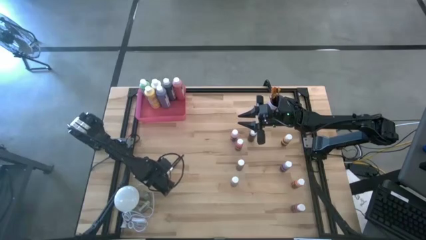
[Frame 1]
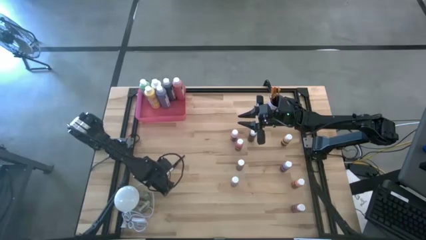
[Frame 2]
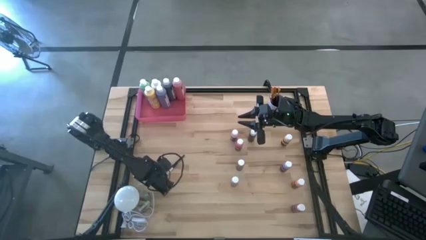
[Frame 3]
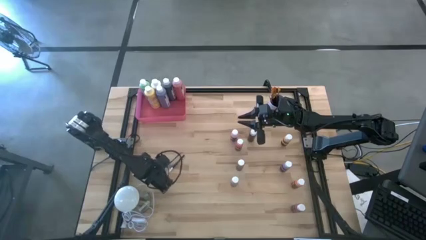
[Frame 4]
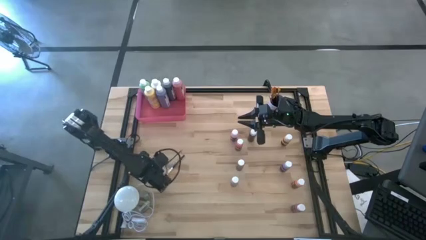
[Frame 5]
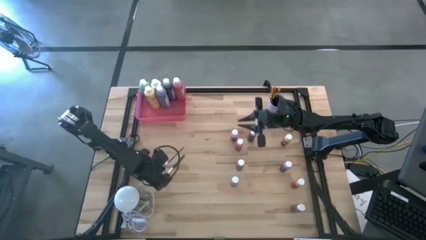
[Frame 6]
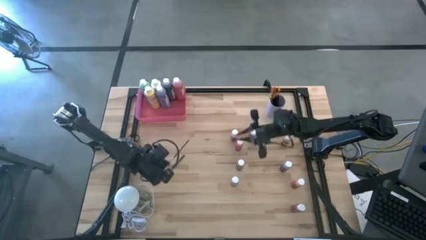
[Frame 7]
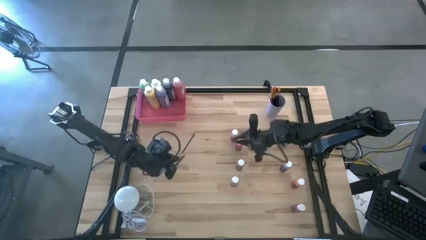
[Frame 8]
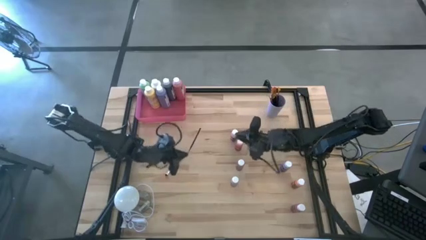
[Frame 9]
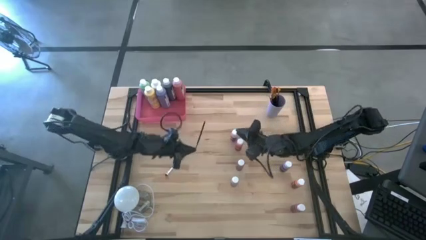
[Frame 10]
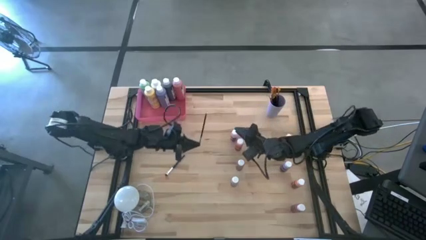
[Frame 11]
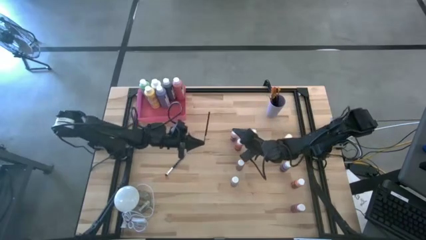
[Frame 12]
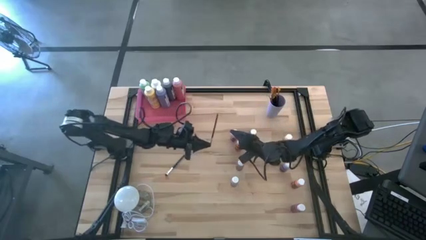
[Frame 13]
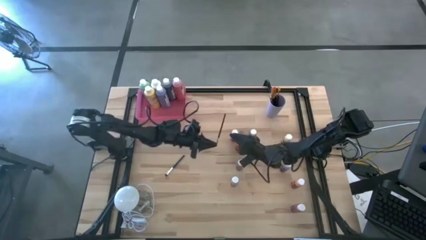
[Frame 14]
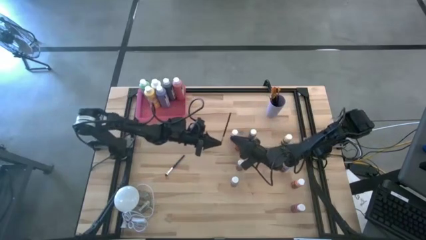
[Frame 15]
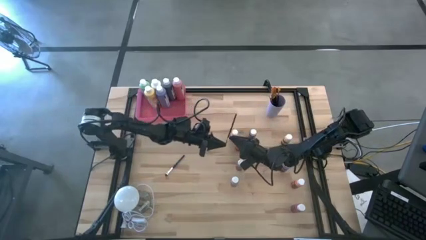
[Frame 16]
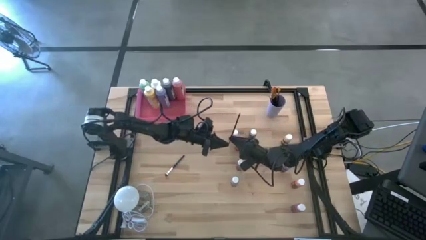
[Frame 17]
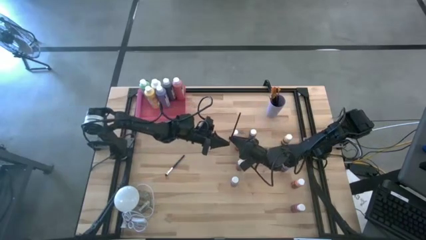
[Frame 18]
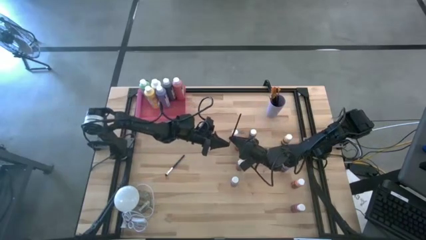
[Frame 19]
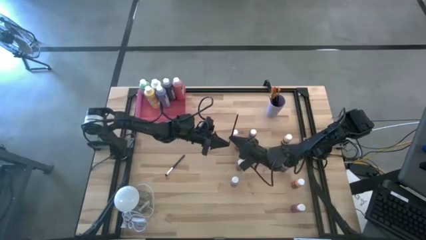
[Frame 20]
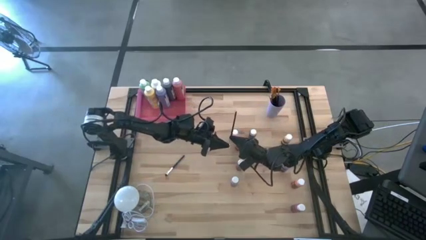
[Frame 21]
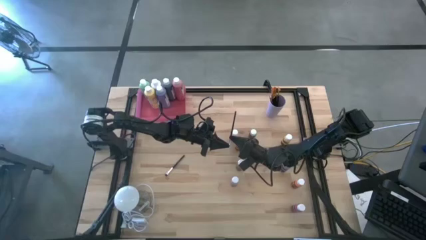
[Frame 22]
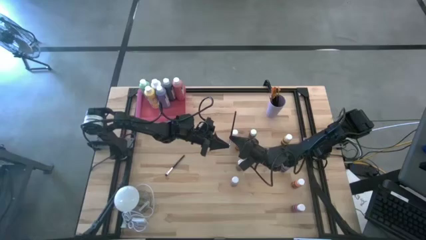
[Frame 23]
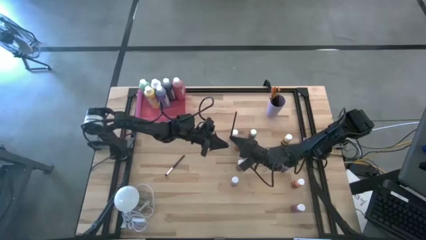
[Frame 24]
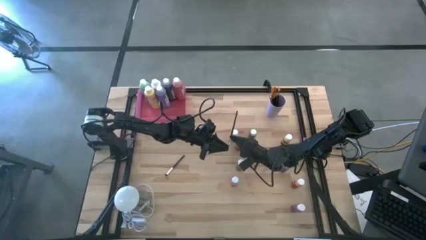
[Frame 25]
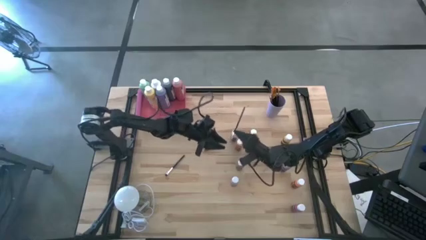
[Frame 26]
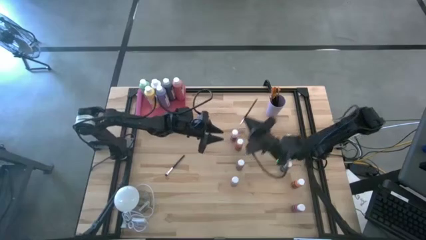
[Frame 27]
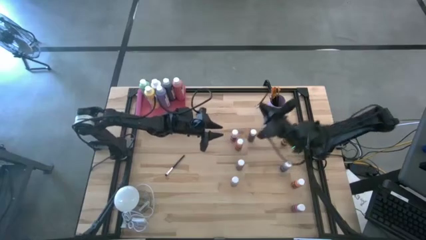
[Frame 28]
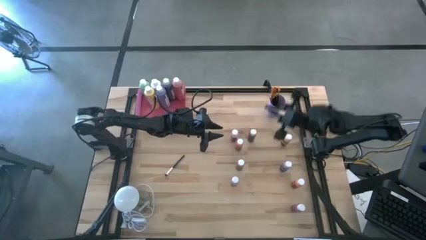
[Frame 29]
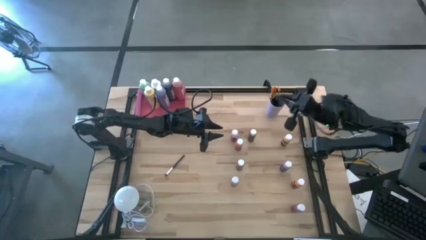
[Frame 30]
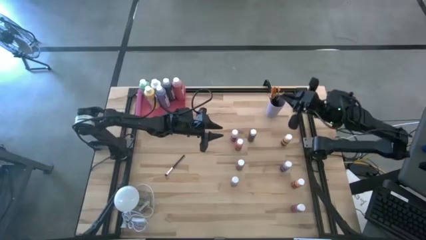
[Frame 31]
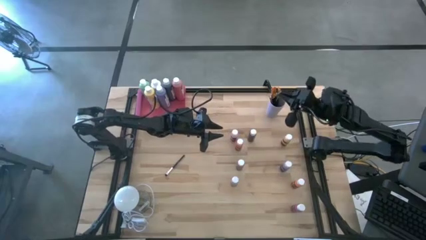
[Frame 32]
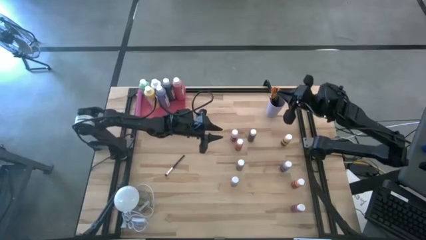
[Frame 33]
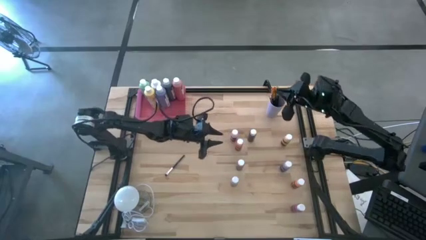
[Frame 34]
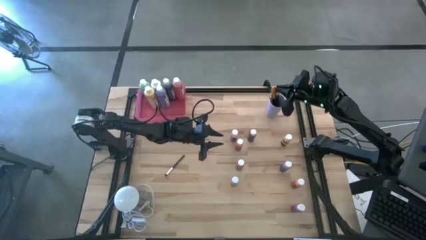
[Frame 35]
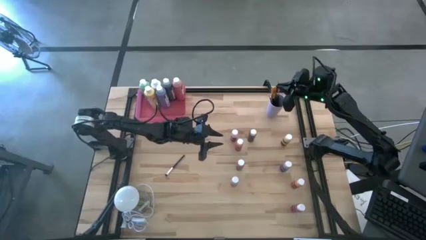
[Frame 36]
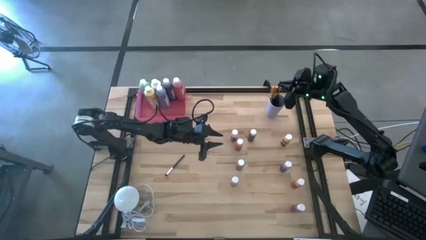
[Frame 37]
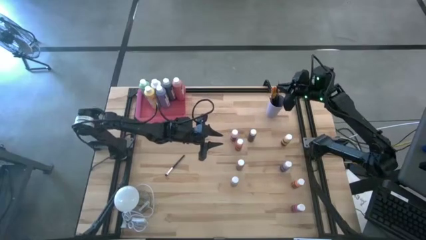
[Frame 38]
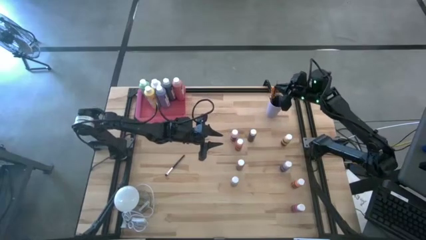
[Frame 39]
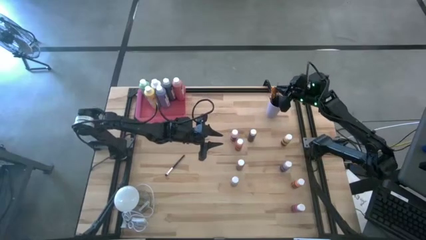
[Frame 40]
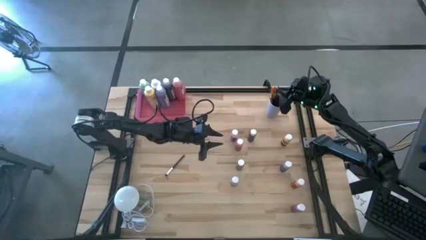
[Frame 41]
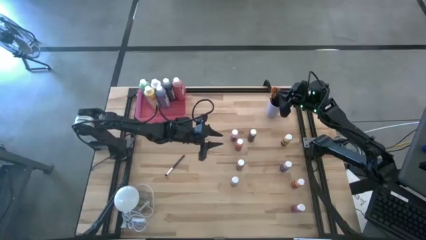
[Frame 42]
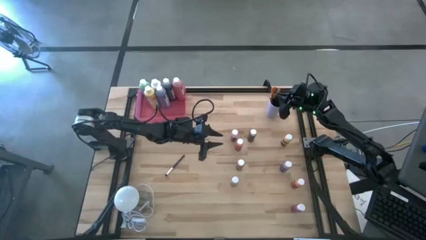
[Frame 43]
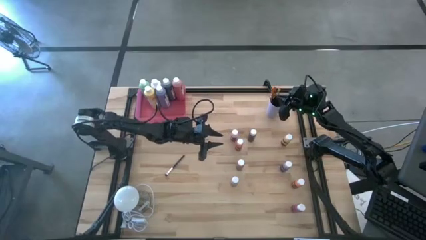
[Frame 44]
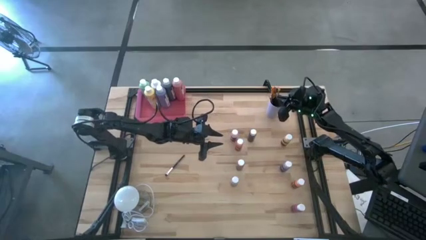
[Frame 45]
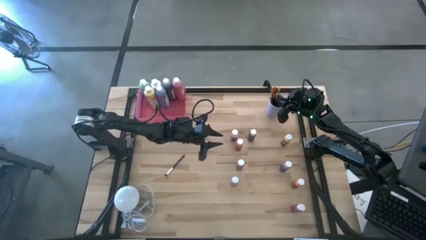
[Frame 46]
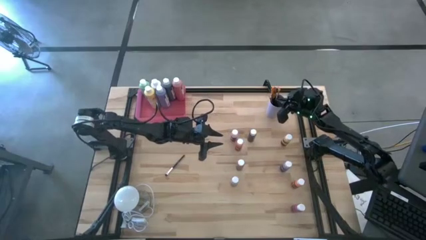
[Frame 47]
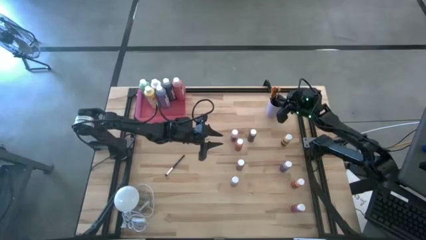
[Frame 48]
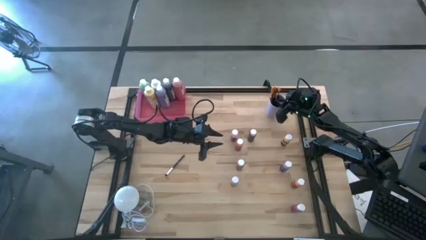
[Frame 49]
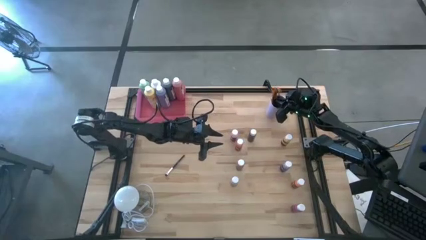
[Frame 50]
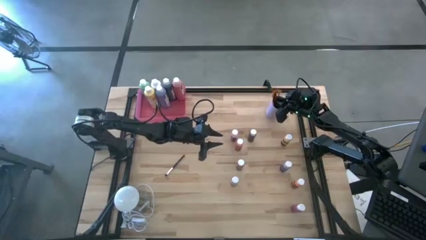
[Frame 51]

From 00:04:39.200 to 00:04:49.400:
Task: Pick & Place Paint Supplies
Put the silver paint brush into the purple cup

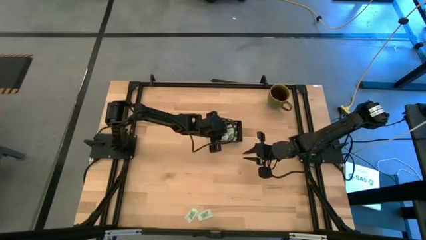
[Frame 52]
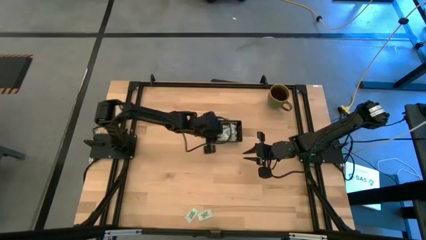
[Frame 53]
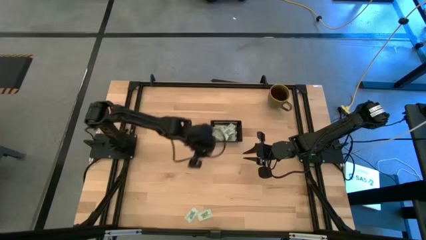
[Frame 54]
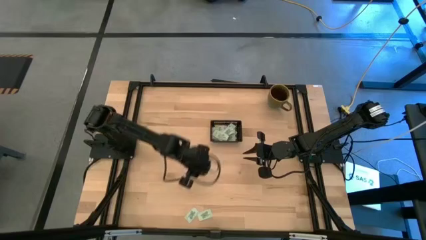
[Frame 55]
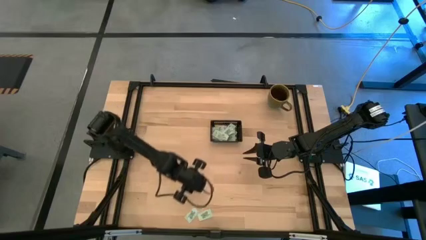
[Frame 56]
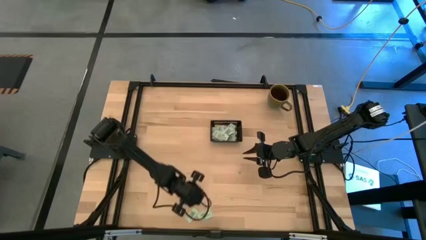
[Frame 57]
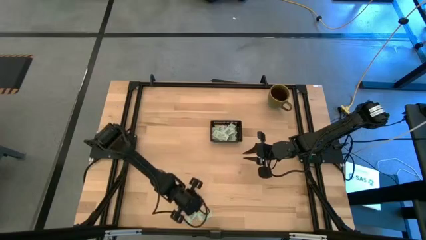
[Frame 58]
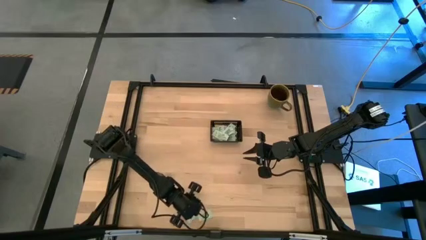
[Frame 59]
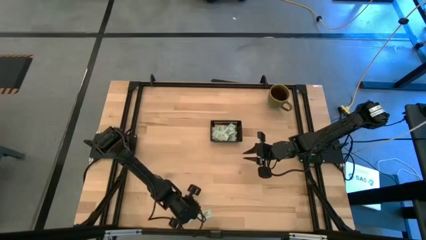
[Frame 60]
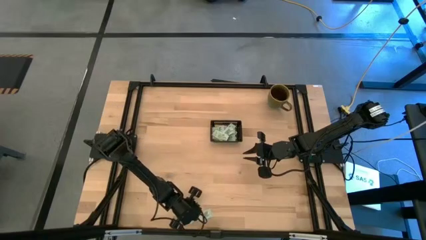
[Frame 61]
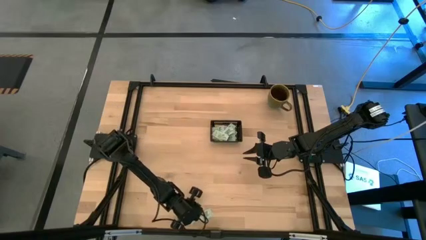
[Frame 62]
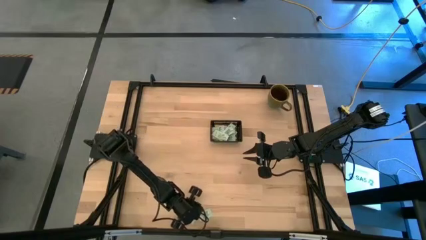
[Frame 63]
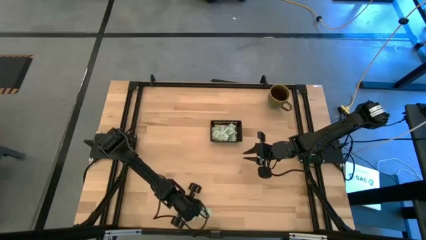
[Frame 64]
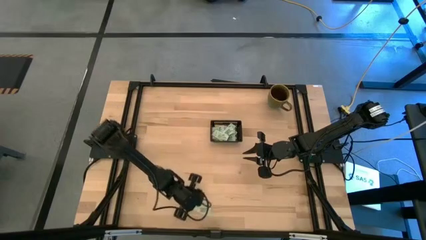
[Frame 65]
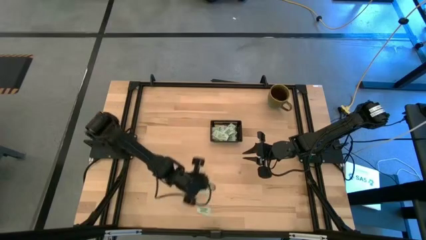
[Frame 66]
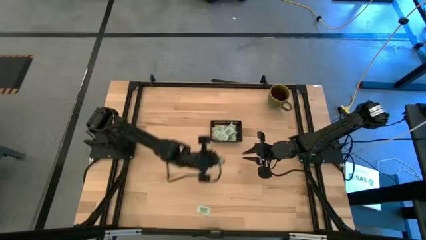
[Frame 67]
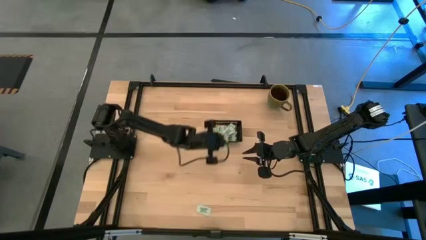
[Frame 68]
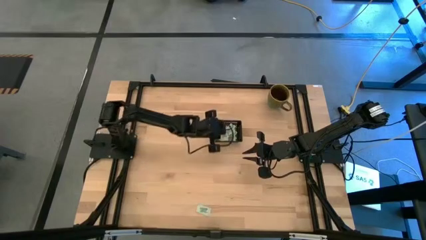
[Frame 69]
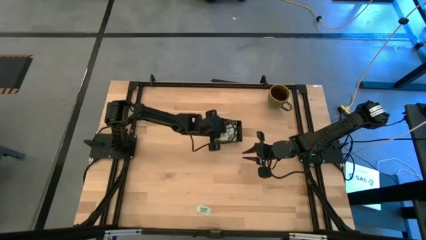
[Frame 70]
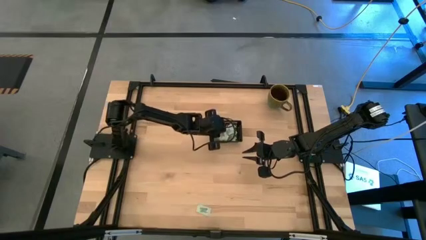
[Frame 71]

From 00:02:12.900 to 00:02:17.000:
Task: Pick and place Stevia / Truvia into bins
Put the left stevia packet into the black basket

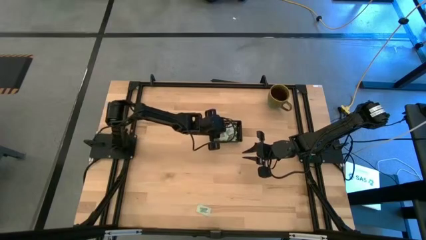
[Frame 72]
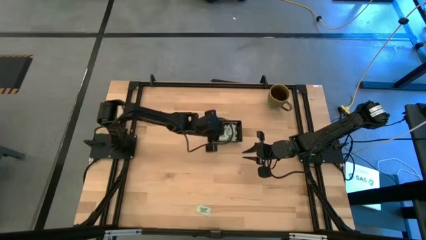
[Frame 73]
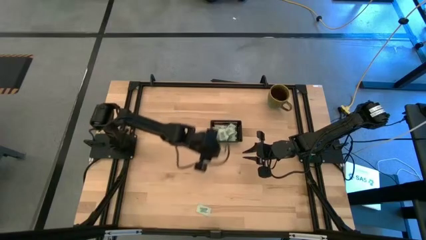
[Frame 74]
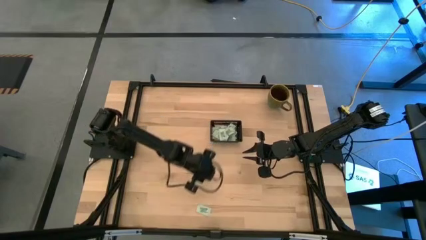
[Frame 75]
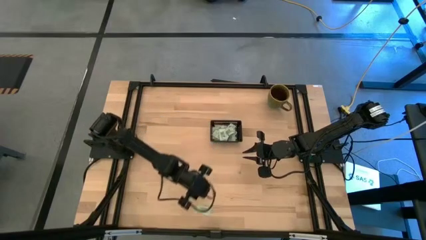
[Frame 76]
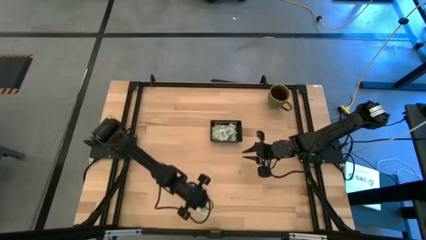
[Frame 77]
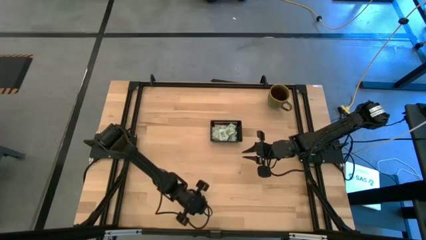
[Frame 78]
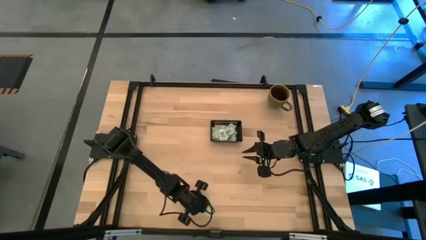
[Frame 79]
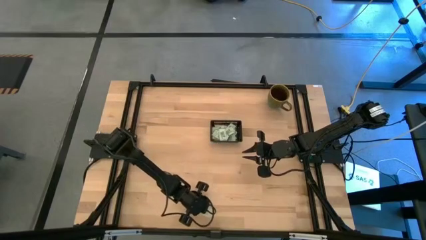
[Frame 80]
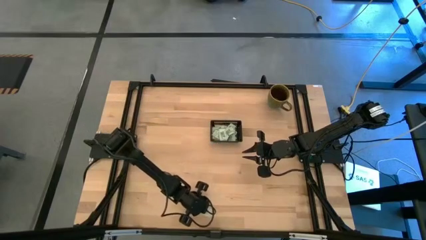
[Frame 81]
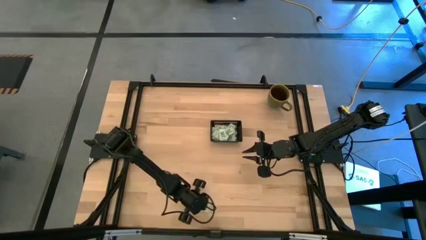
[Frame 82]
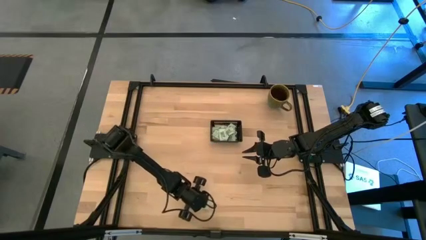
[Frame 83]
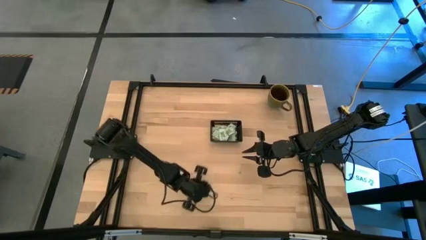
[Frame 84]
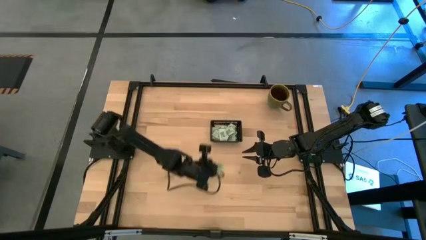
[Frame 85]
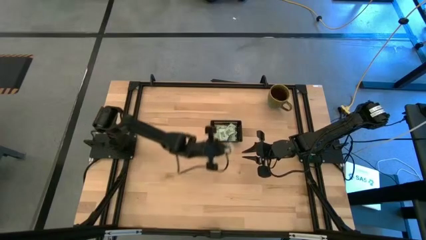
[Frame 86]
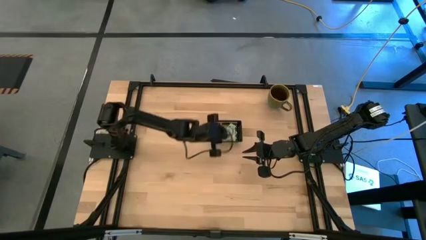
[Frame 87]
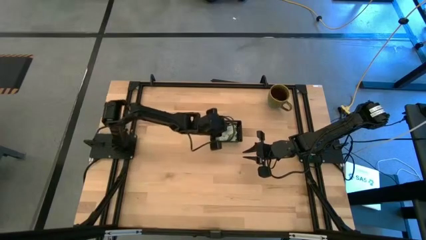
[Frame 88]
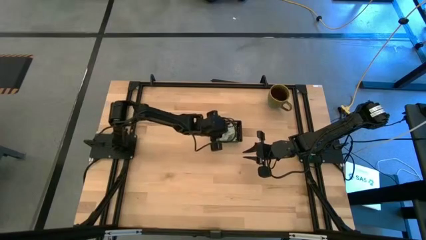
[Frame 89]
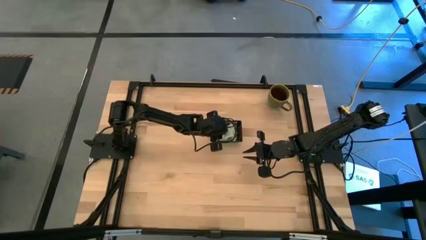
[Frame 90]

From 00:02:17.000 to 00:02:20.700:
Put the stevia packet into the black basket
